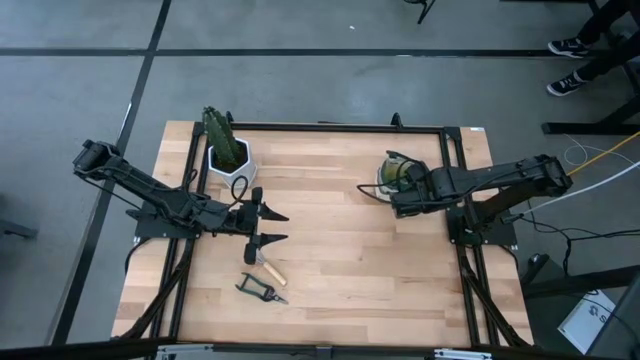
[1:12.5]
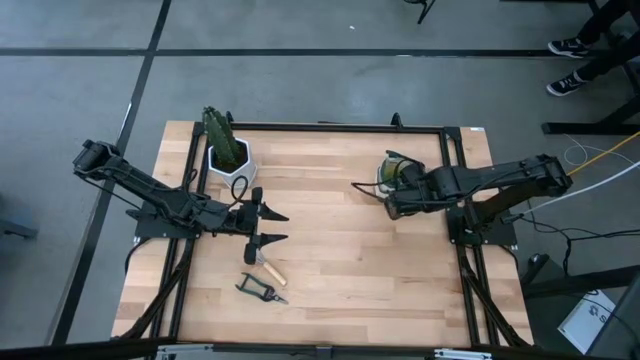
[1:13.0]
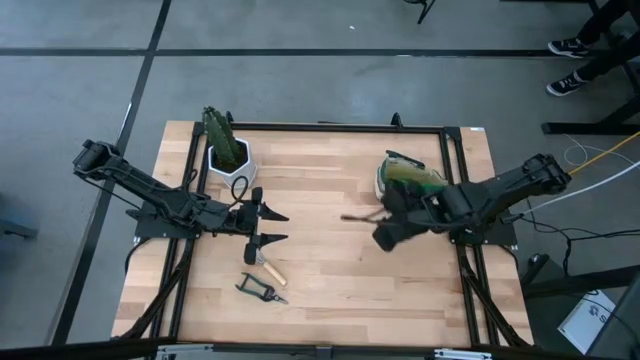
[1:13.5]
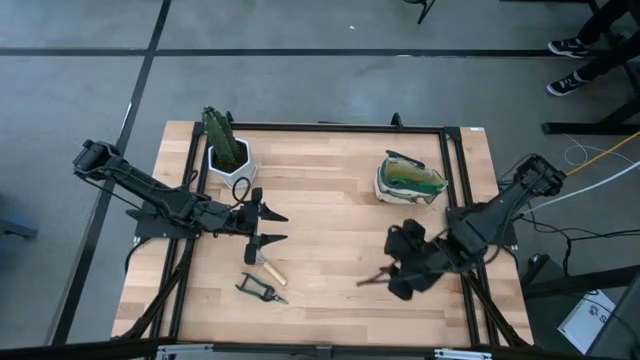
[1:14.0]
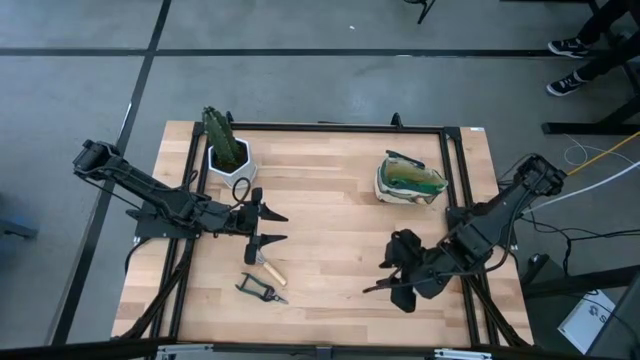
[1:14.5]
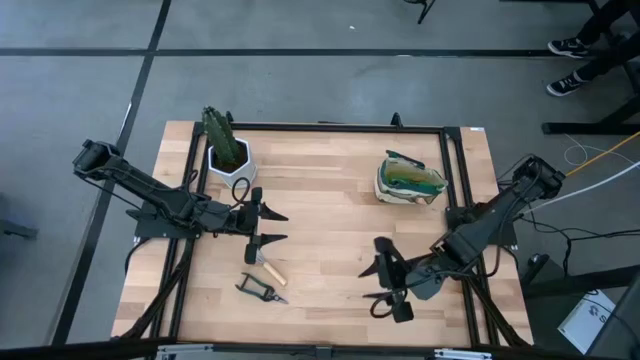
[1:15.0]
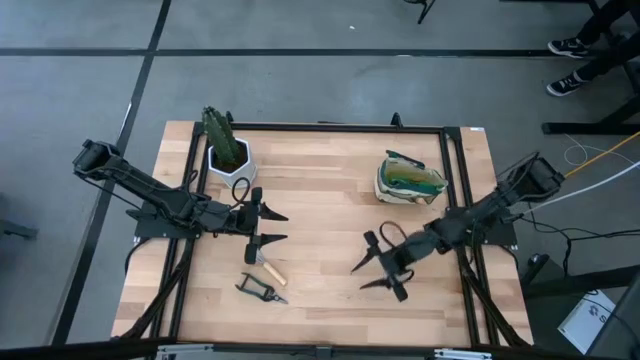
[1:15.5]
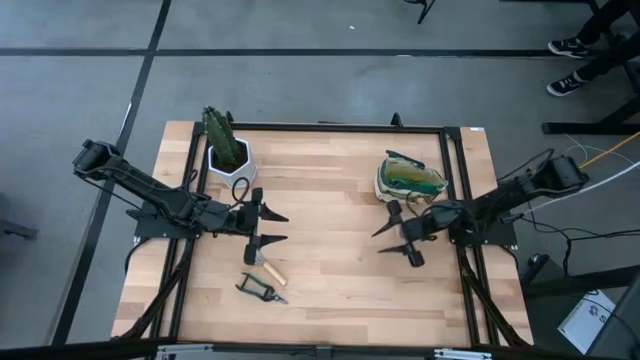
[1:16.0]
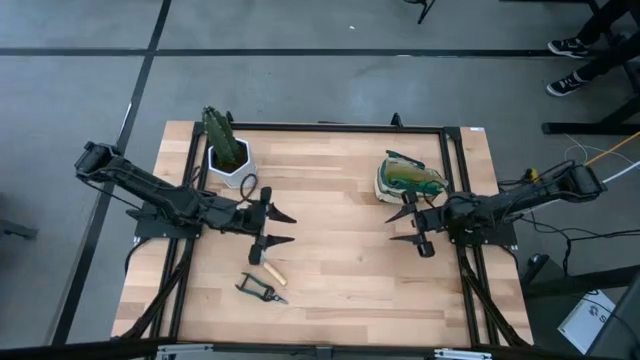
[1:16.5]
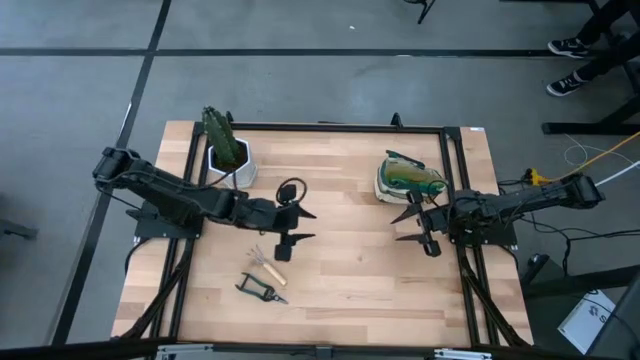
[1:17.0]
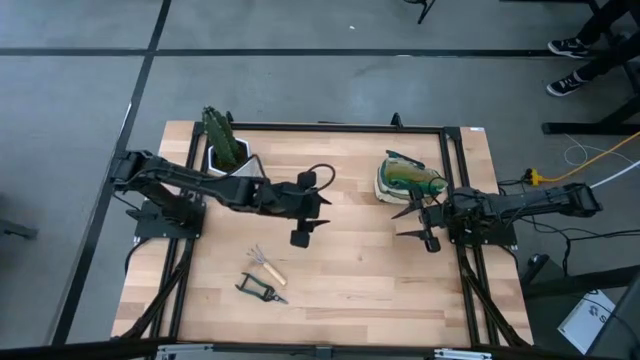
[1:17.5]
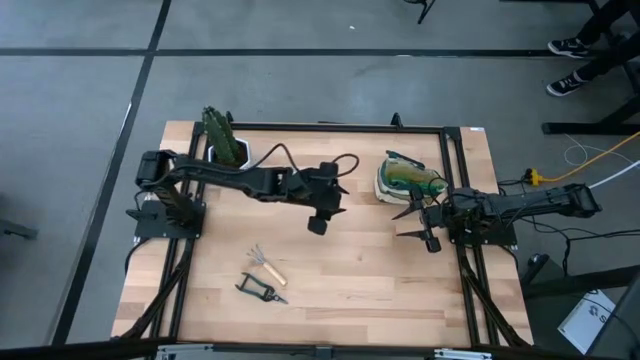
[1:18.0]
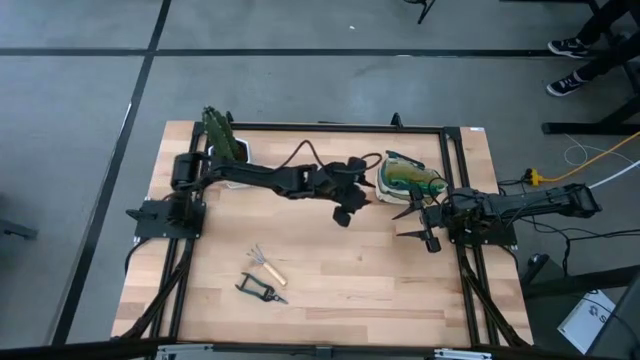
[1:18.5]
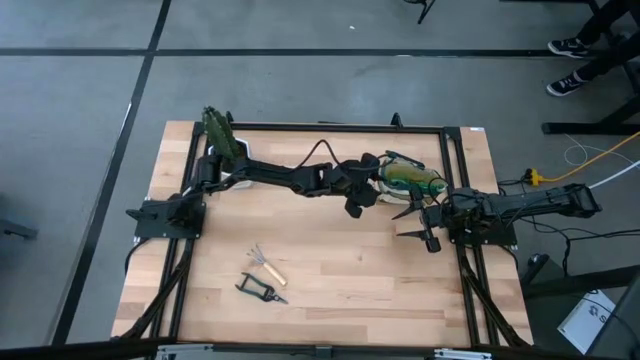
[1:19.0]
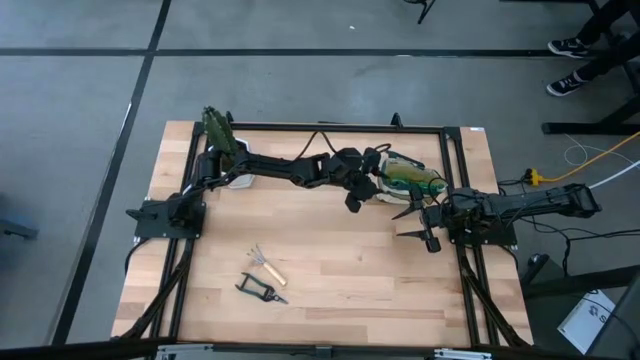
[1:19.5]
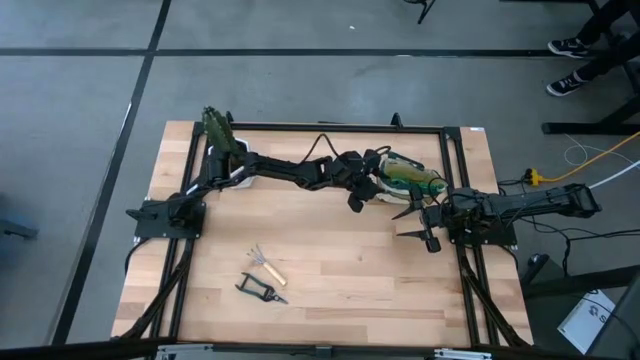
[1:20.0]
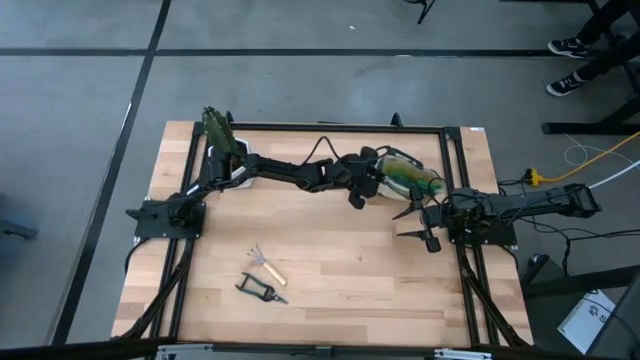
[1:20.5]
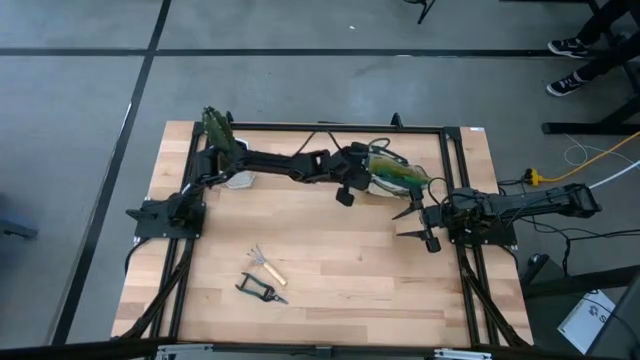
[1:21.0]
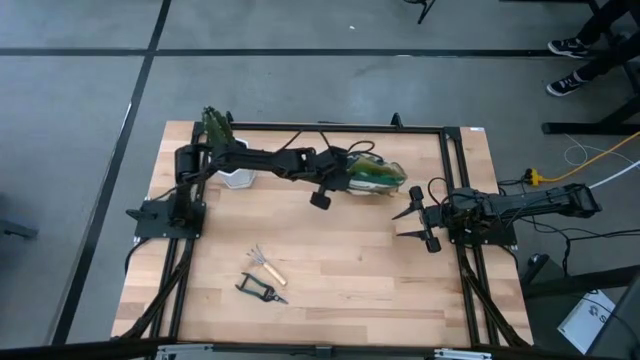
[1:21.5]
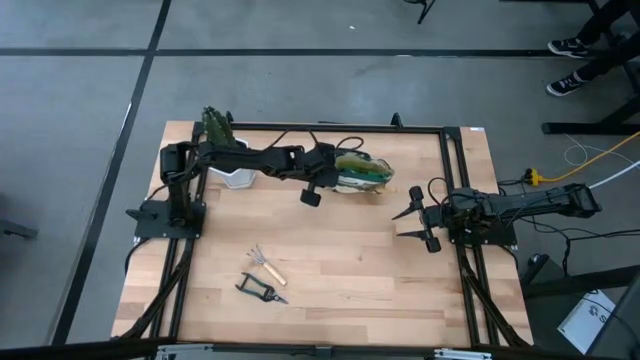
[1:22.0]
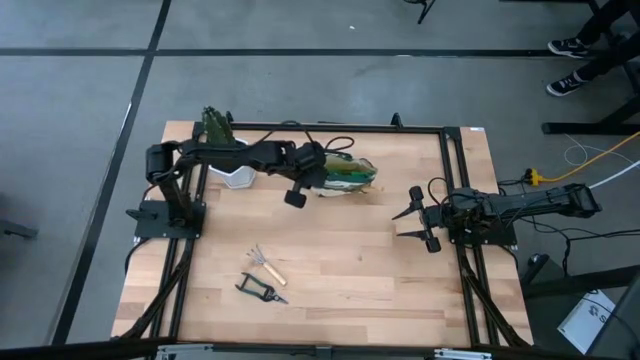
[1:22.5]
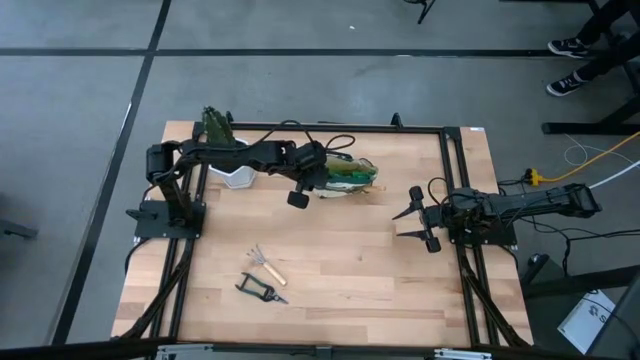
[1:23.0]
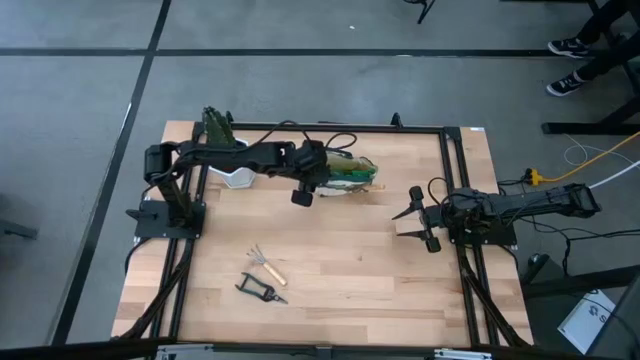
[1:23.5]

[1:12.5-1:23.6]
Task: Pick & Place Garden tools in Gardening bag
Move the gardening bag to the top center of the table

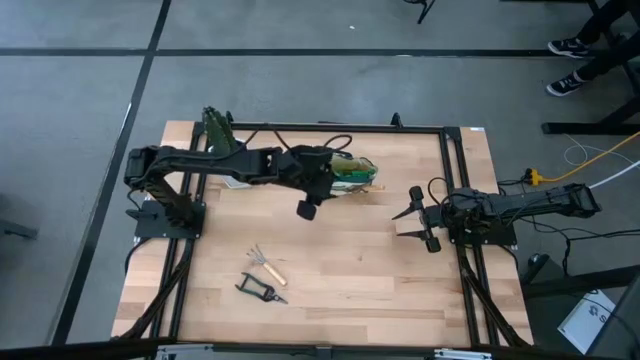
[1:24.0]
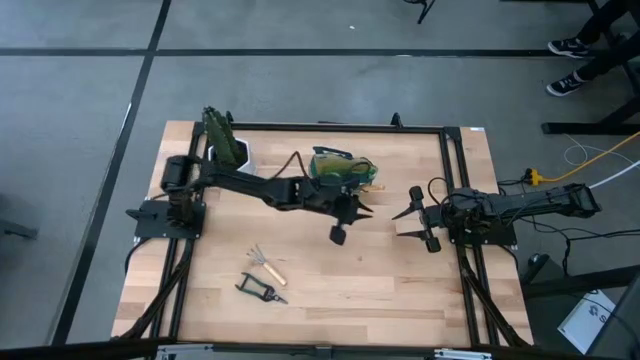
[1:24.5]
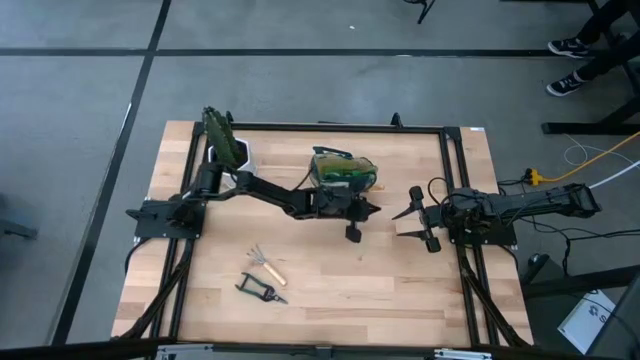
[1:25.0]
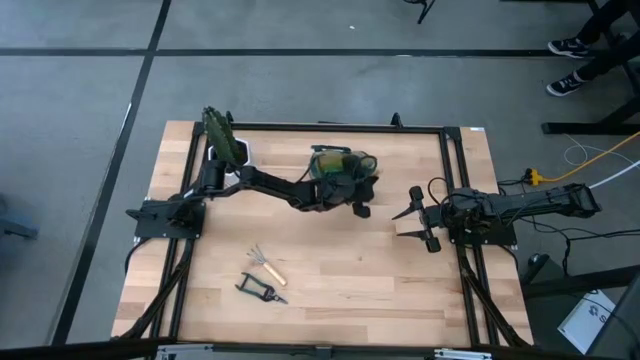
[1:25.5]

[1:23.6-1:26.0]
Adjust the trowel in the gardening bag

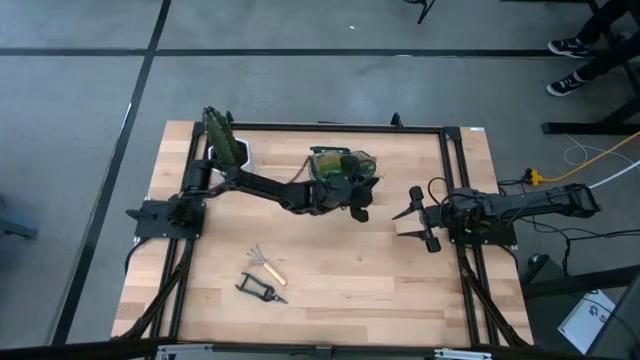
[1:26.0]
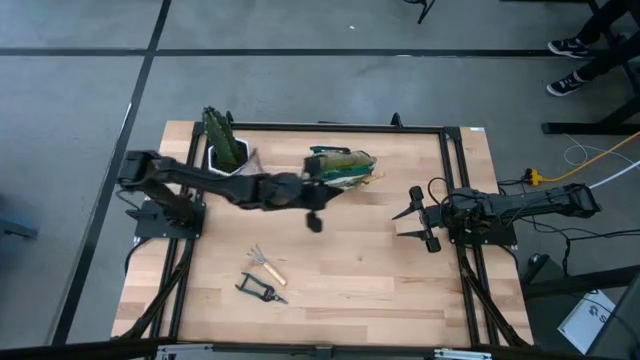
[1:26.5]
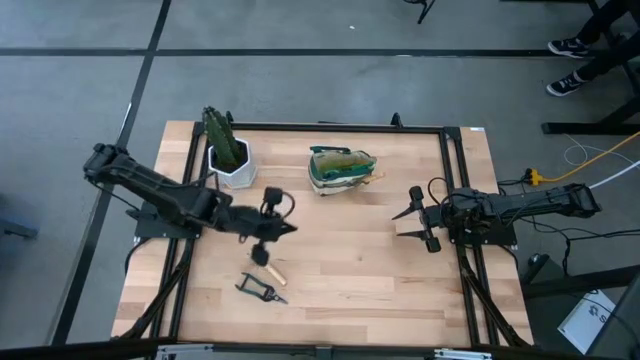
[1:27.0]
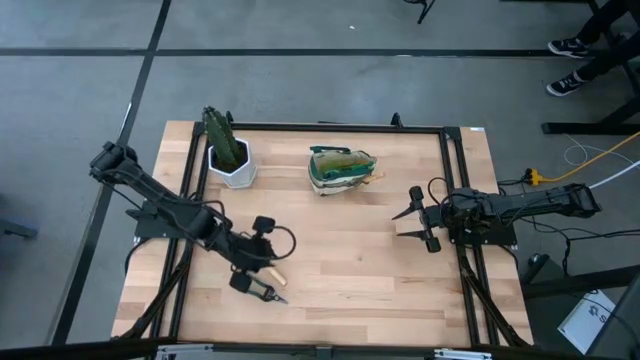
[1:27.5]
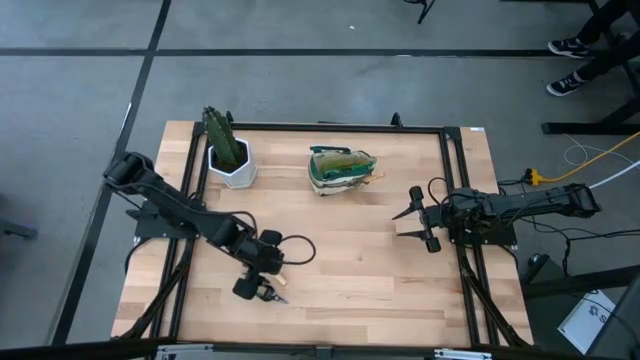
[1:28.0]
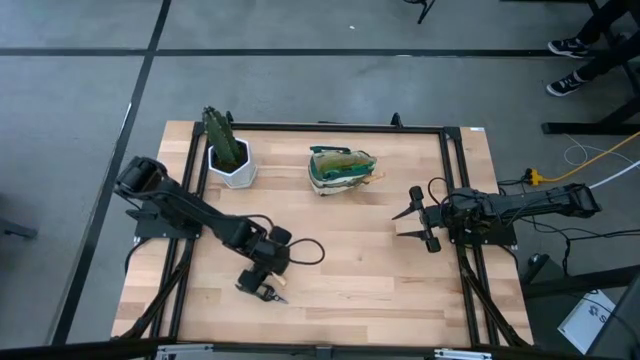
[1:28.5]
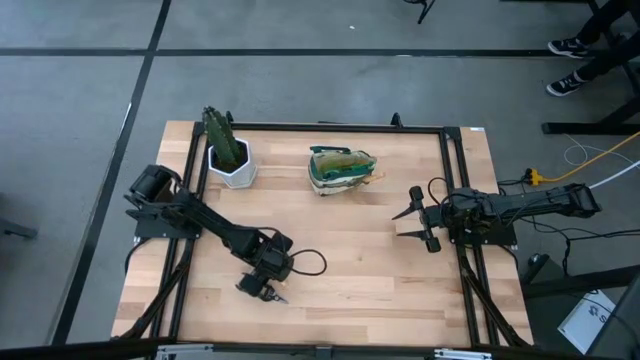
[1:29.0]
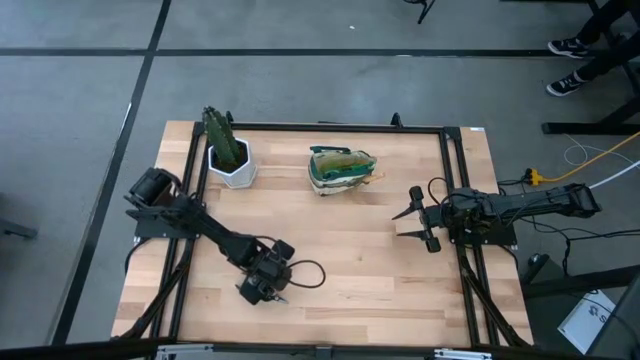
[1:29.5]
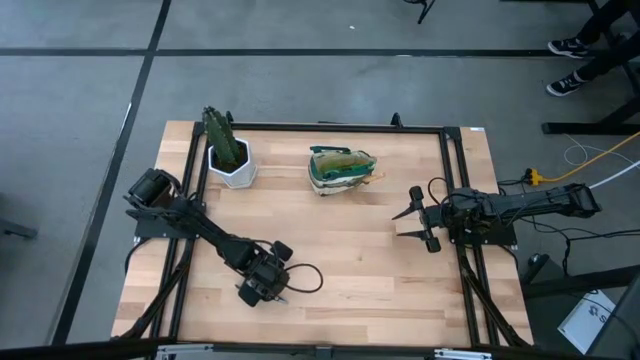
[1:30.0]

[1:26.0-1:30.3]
Adjust the hand rake on the table

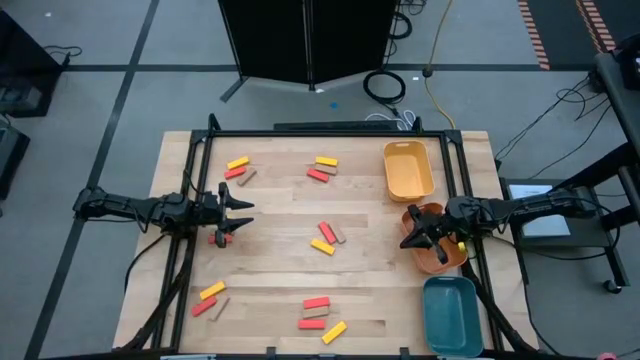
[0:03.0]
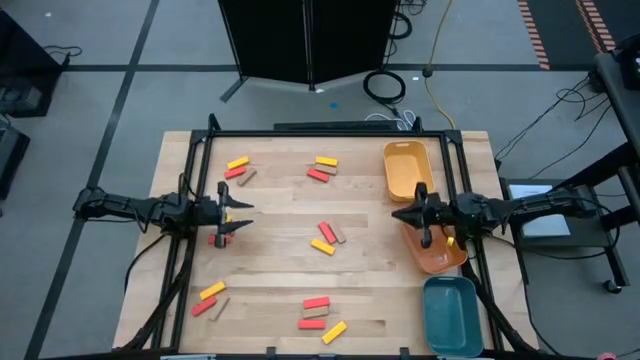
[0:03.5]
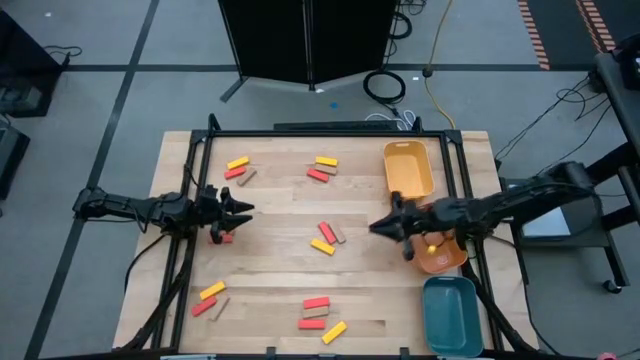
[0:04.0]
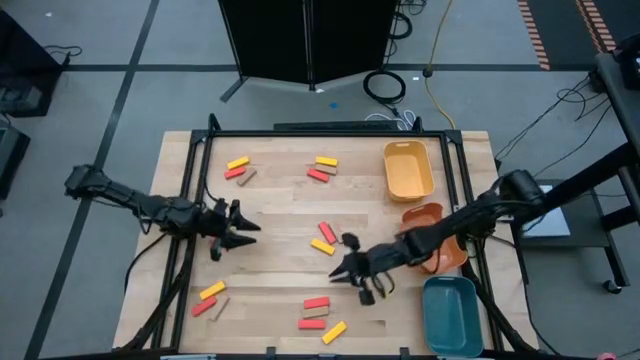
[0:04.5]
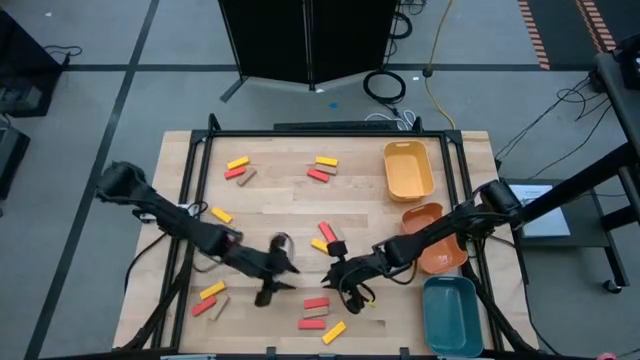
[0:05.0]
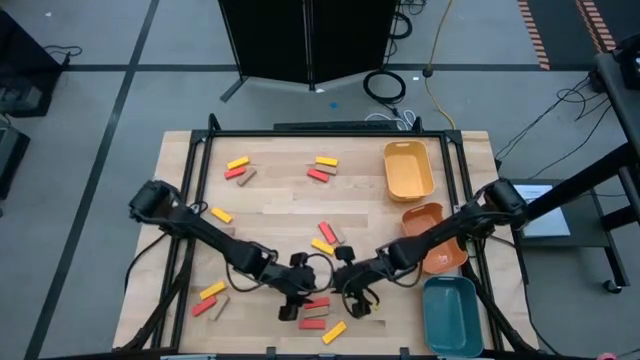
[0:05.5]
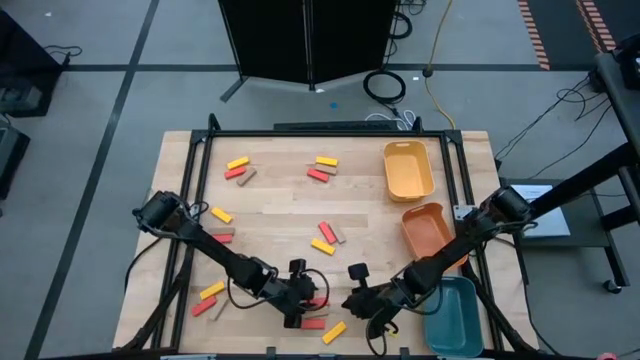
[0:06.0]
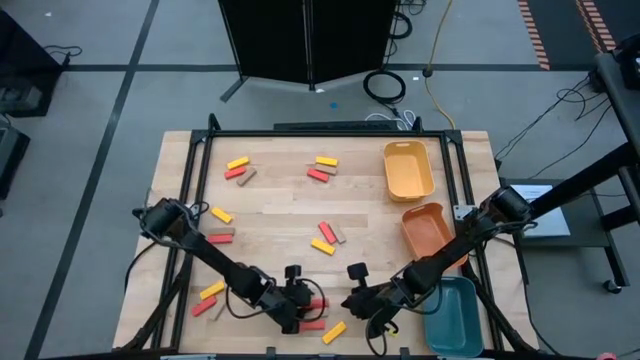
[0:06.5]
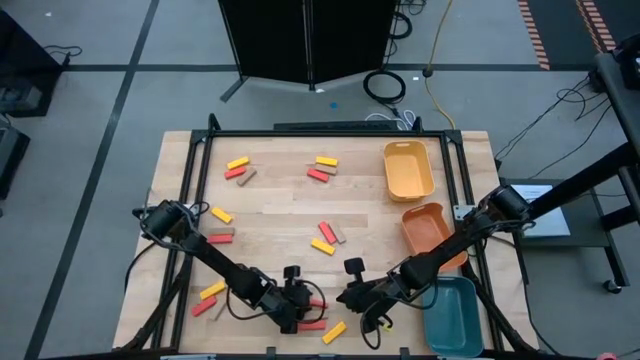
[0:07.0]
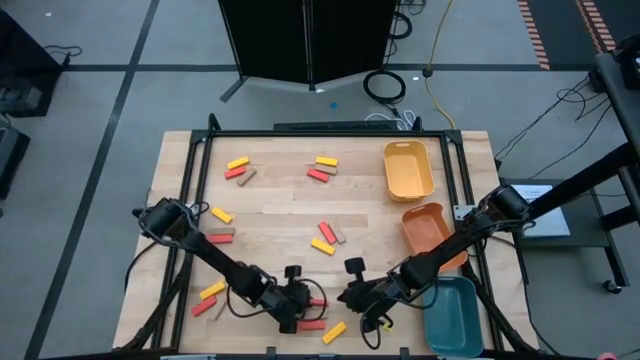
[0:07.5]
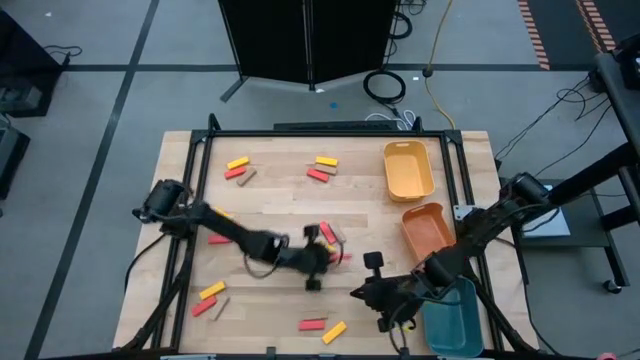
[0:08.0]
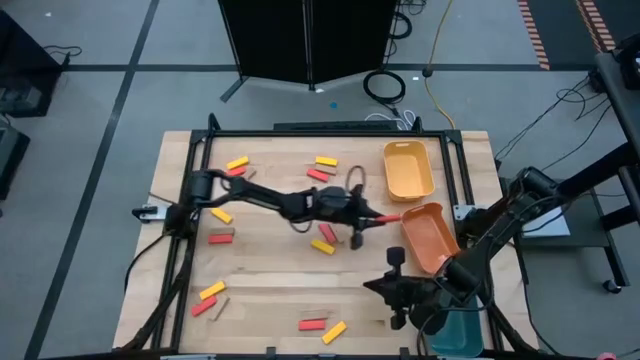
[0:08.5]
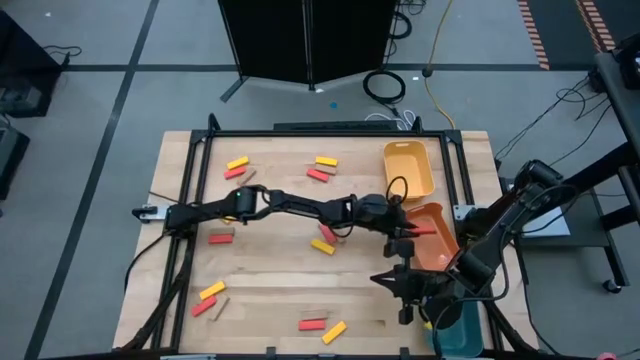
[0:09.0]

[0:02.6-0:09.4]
Task: Sort blocks
Put the red block into the orange bin
